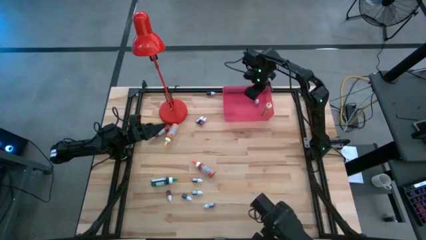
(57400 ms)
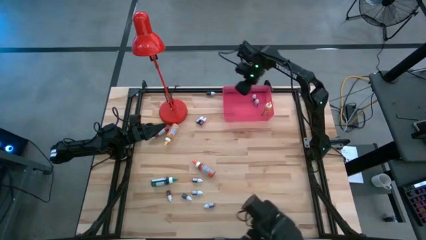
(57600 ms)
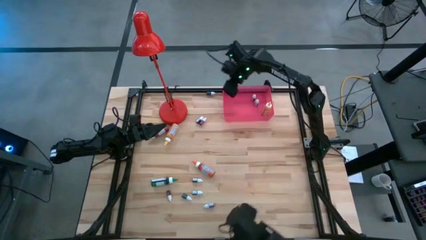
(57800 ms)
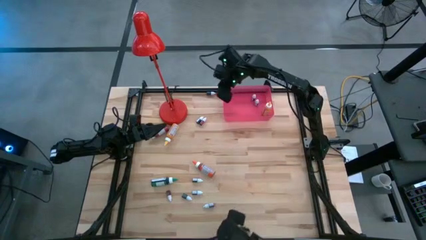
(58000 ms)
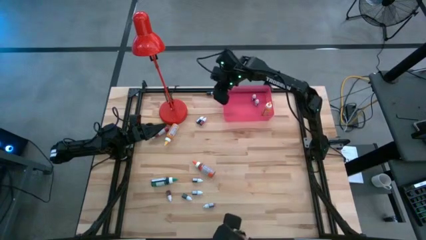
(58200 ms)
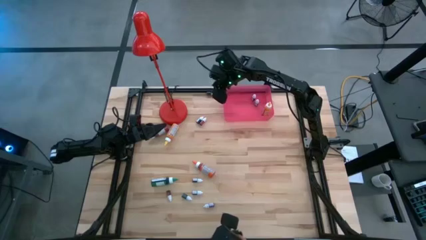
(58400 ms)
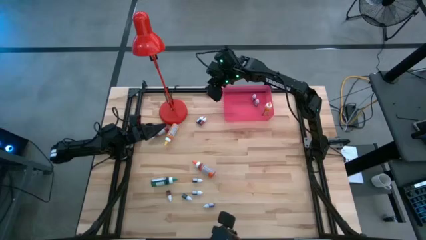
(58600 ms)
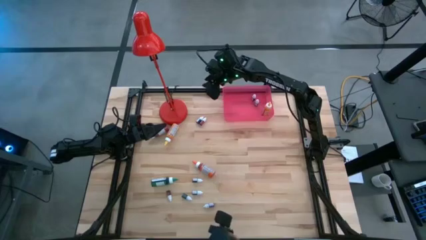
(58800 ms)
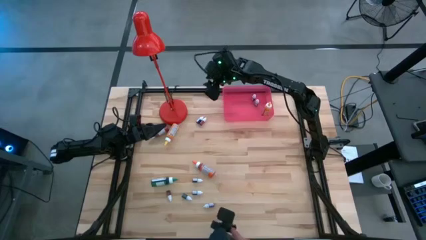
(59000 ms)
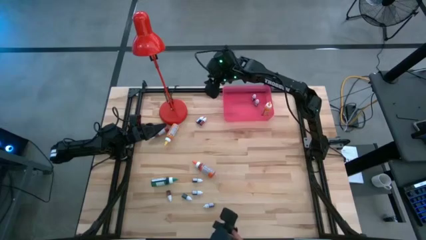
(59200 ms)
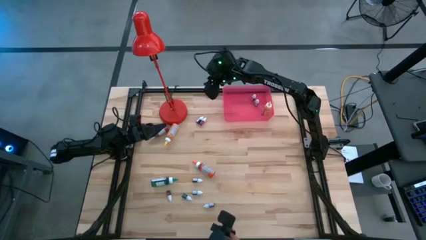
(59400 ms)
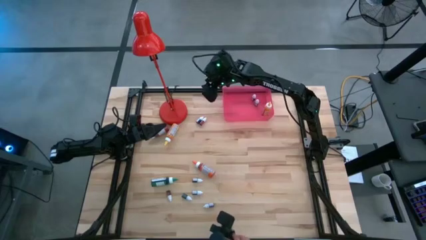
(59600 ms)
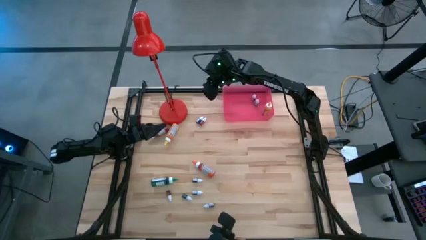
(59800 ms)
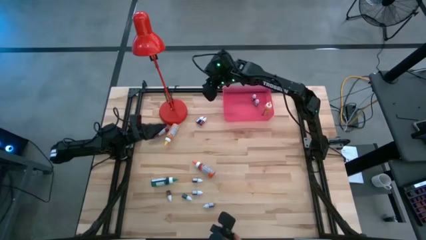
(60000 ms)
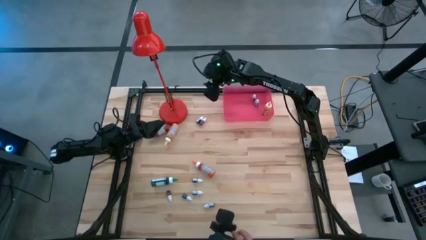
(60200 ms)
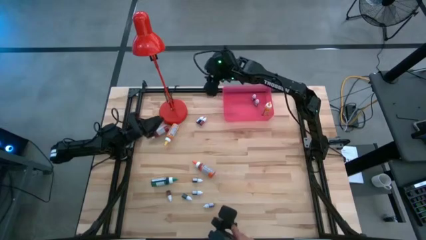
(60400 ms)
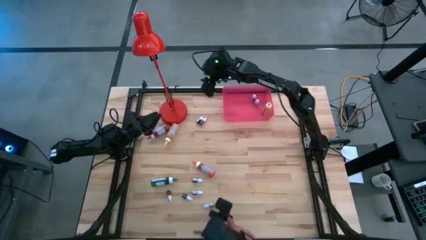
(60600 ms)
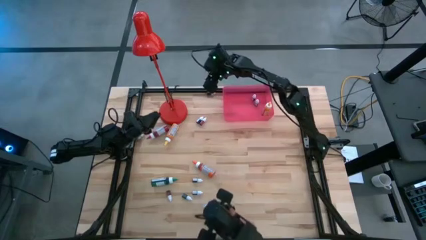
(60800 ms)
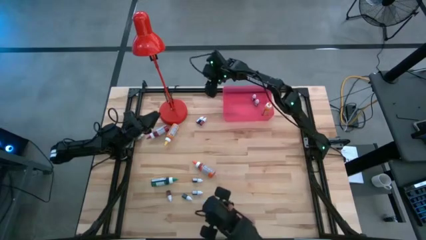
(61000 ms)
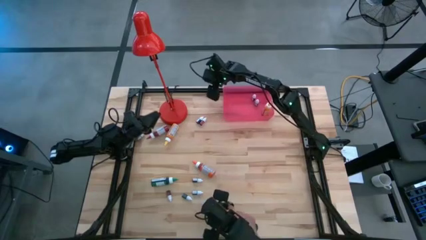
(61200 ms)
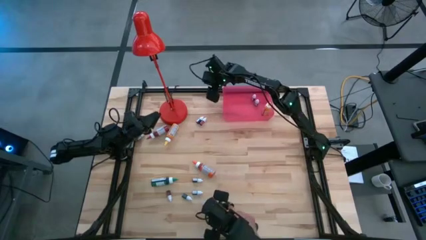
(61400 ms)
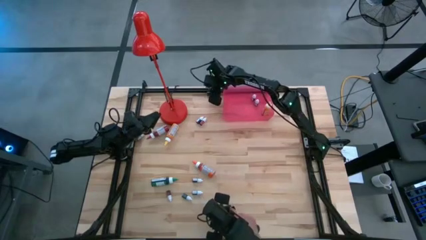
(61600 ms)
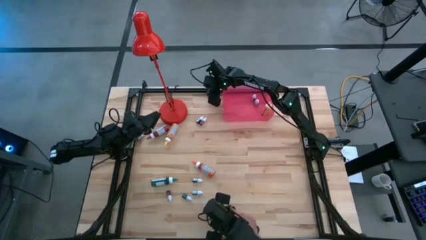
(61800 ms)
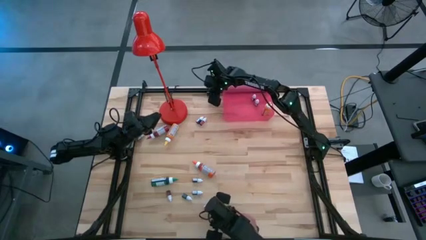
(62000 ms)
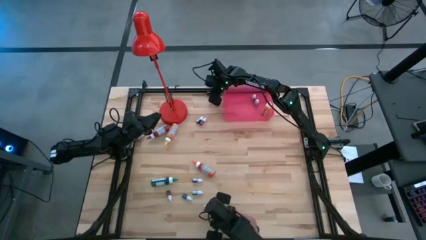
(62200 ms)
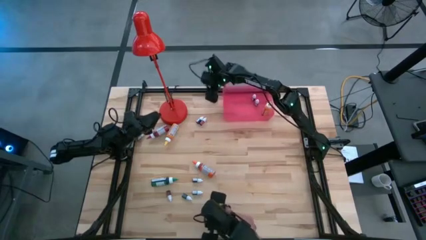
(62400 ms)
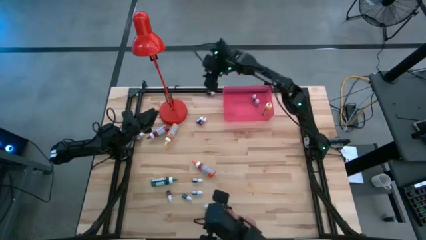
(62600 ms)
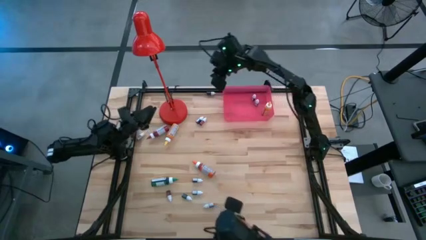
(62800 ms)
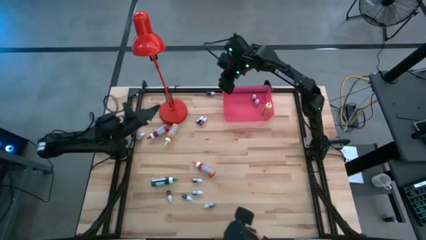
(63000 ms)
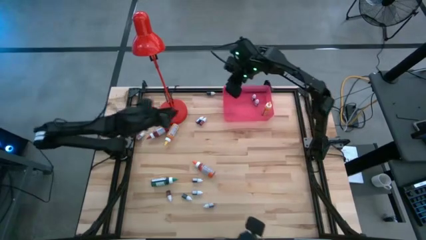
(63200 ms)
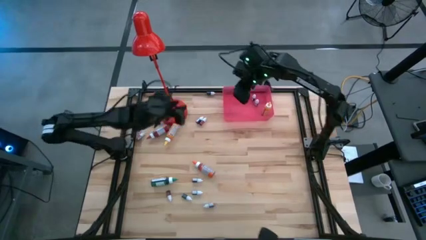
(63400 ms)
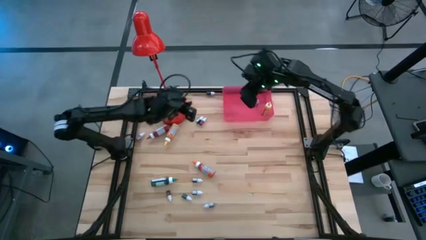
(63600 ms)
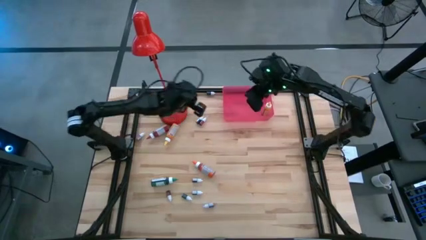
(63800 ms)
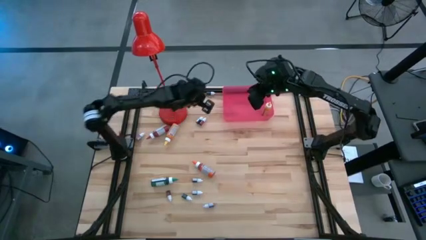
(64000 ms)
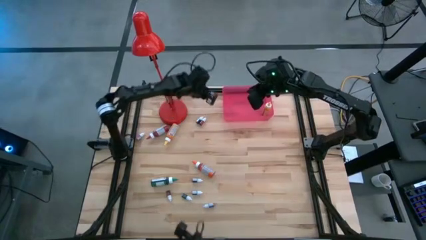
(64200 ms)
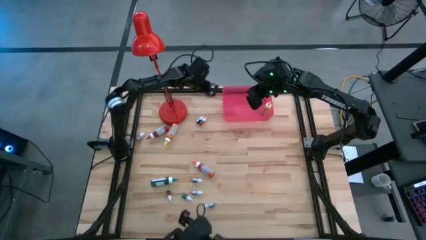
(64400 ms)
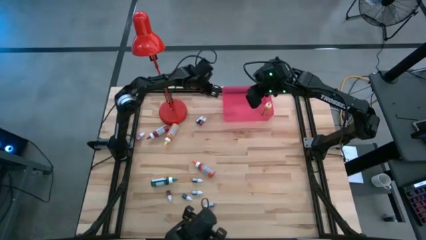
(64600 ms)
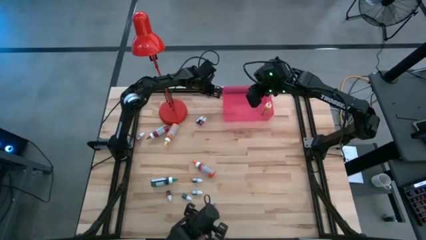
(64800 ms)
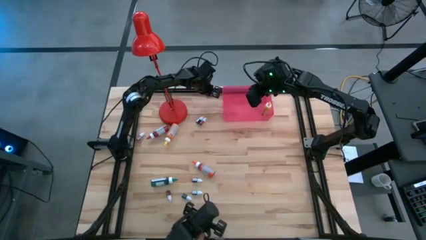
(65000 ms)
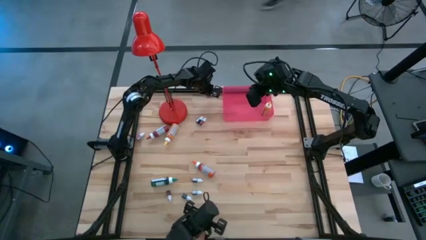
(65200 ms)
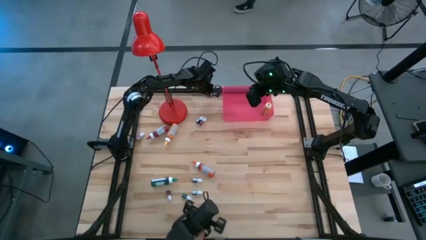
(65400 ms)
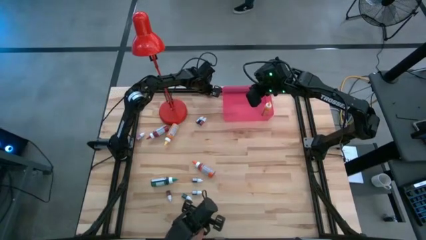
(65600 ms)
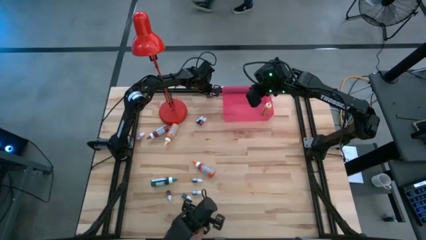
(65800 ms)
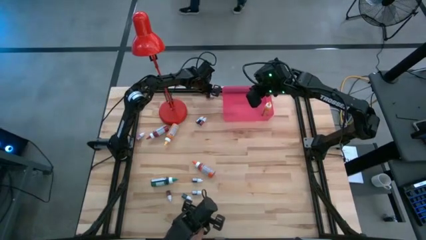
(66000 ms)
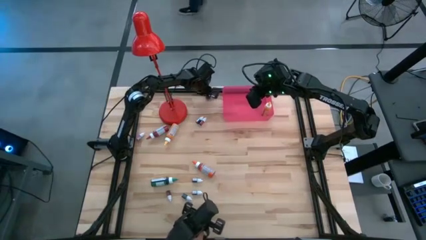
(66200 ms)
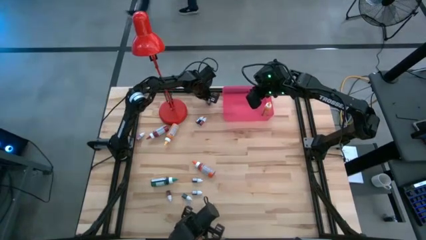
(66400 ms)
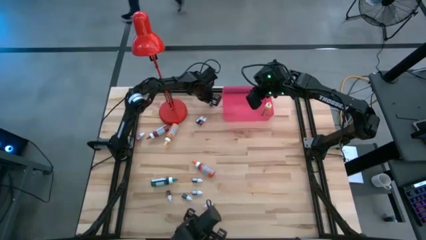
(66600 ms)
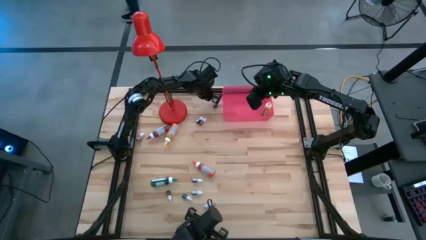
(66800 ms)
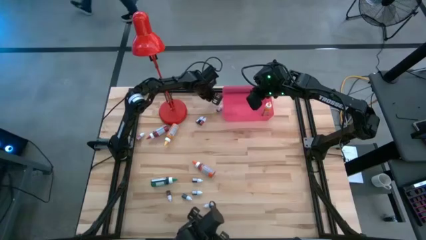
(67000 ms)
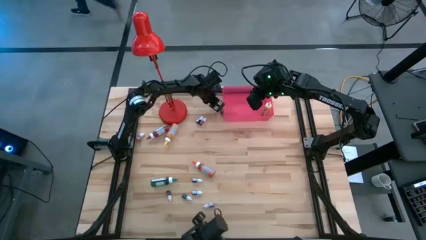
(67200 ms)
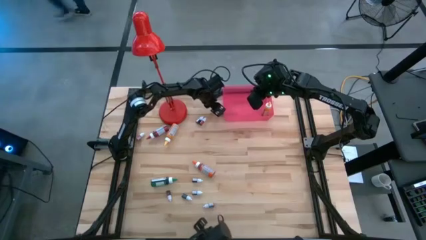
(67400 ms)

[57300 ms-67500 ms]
Task: Pick & Place food coloring
Put the small green food coloring bottle into the red bin

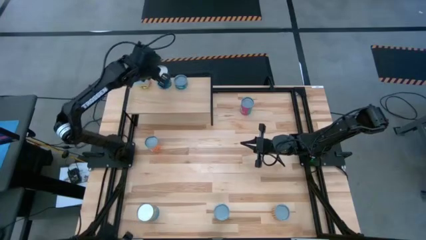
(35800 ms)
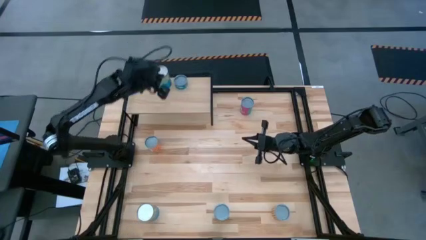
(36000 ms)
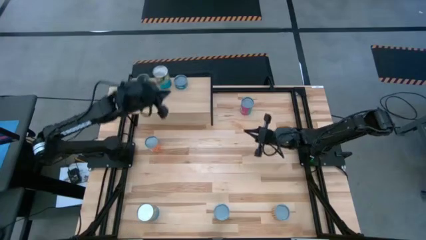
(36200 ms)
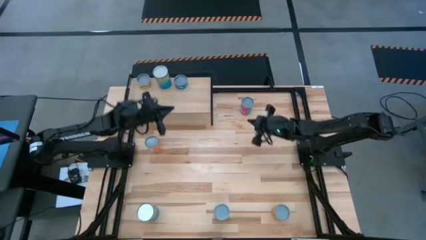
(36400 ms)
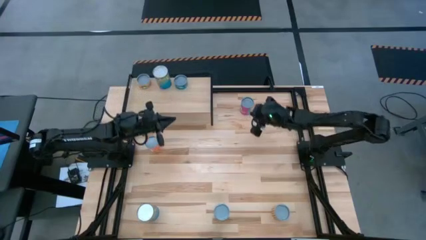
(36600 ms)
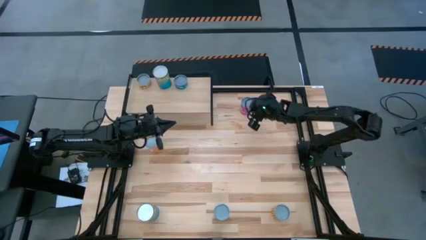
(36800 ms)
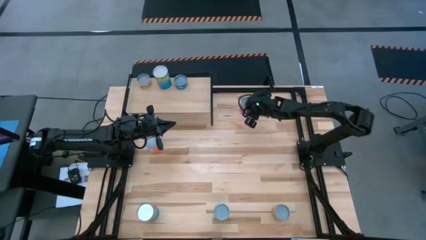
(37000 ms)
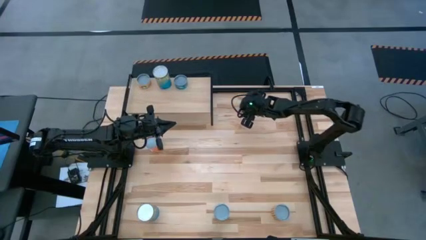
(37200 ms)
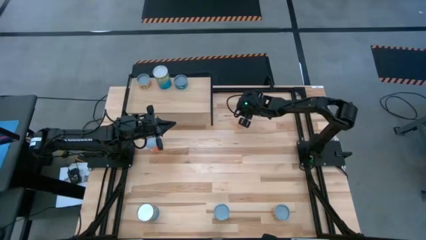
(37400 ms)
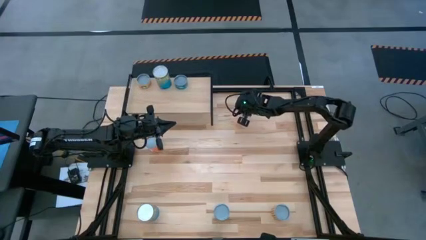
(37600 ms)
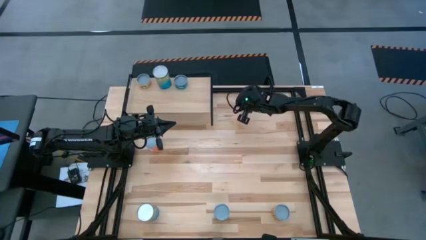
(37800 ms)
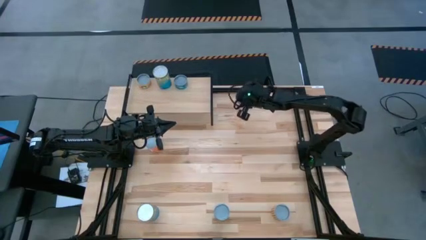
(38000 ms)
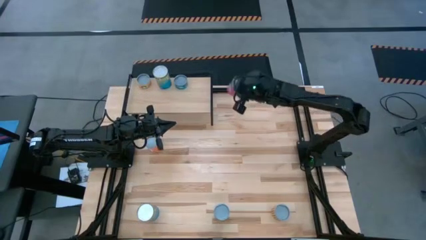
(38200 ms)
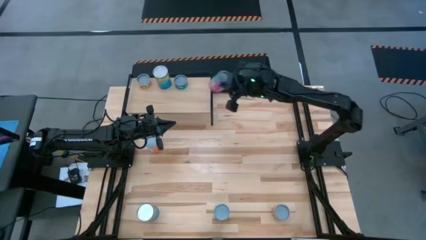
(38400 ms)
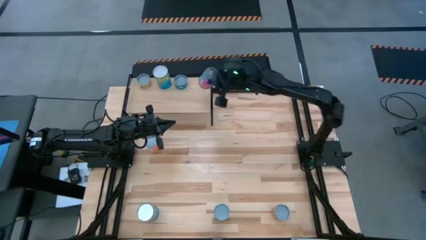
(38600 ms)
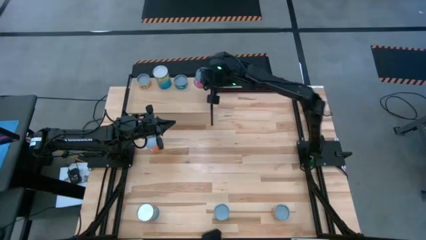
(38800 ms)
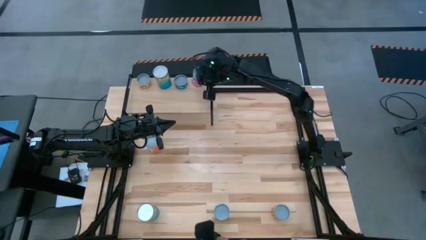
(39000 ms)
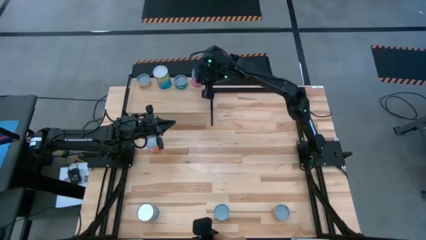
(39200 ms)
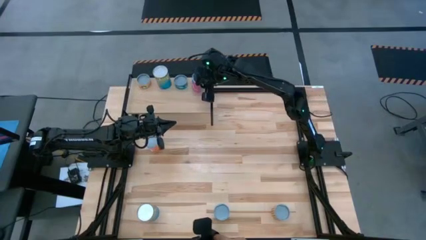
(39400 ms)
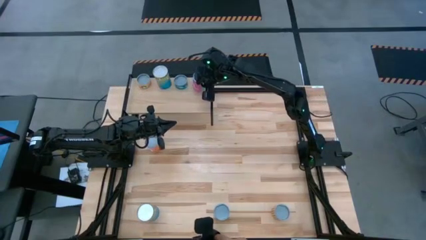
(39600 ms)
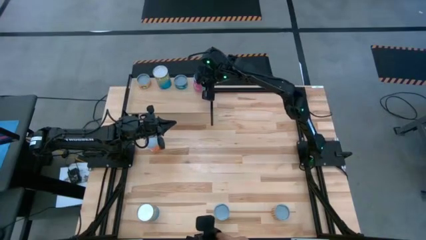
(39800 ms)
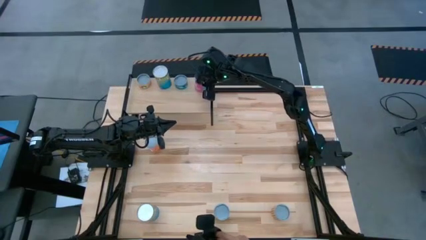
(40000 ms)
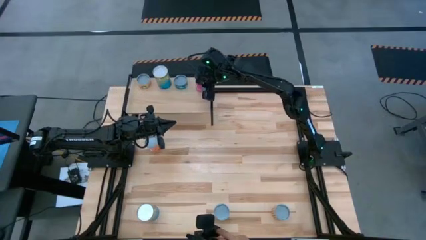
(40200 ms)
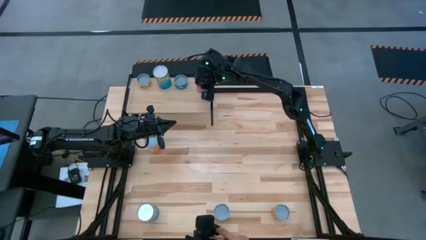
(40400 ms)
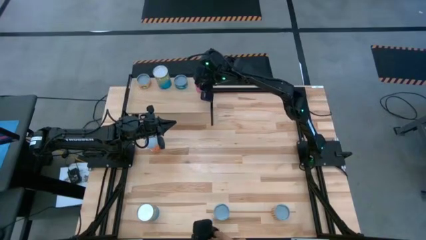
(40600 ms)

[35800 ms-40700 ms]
Task: Pick and place cans onto a shelf
Put the canned chicken soup on the shelf
